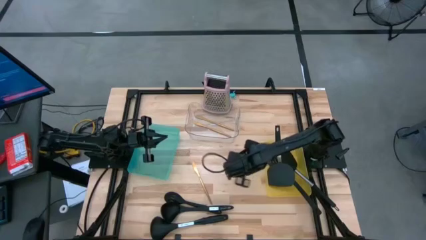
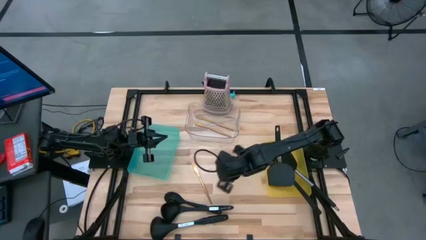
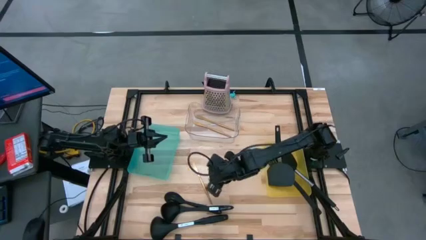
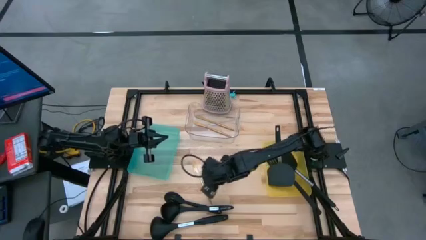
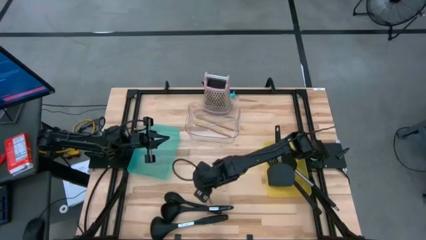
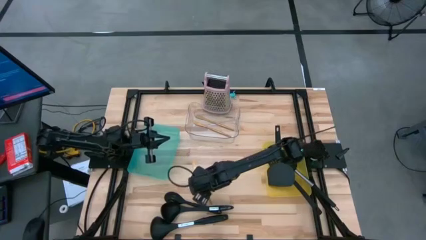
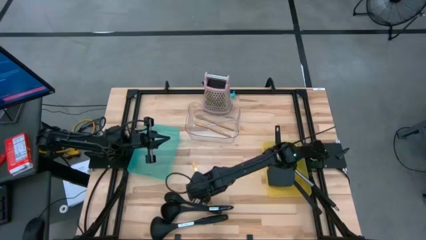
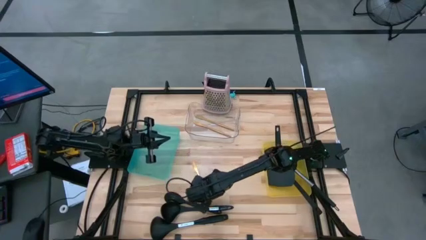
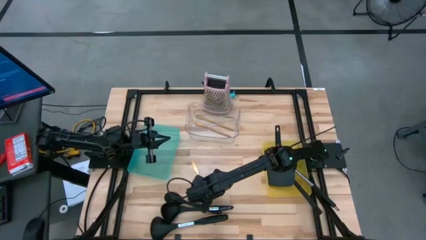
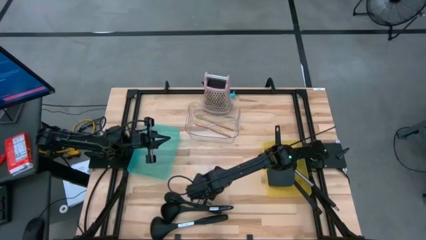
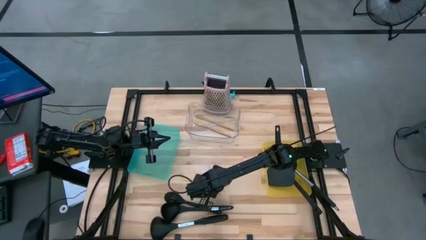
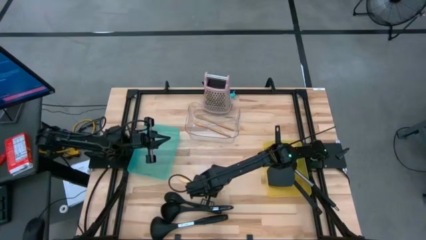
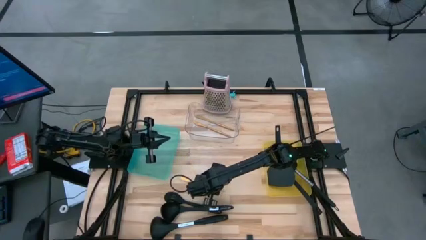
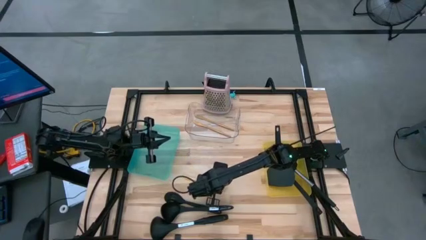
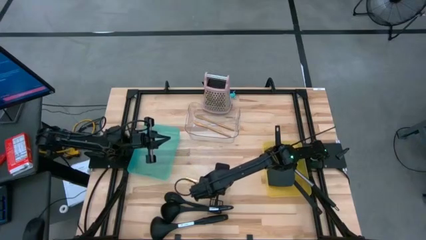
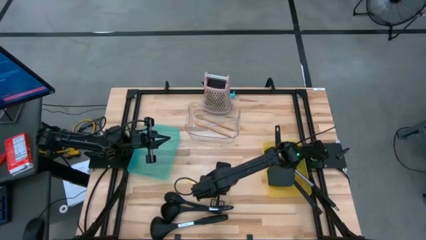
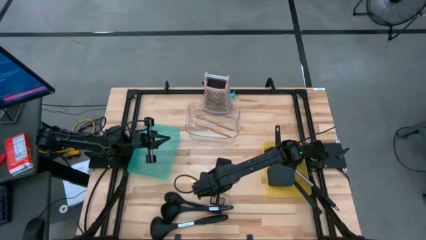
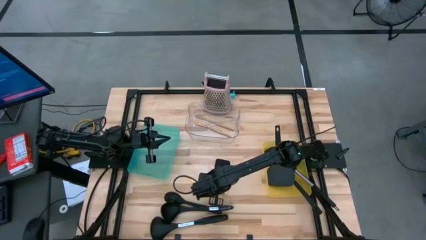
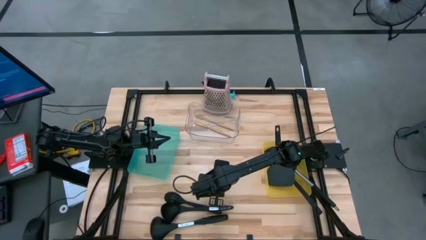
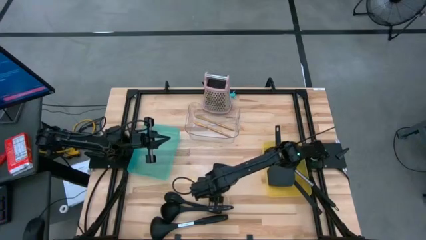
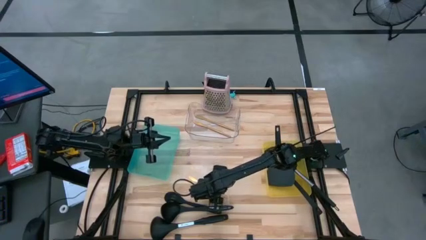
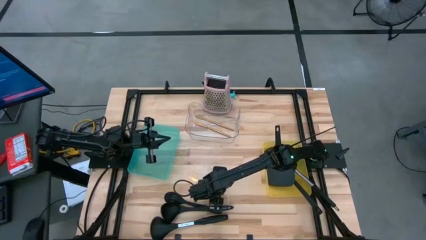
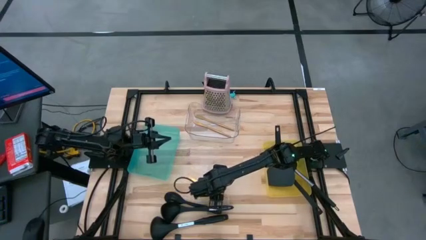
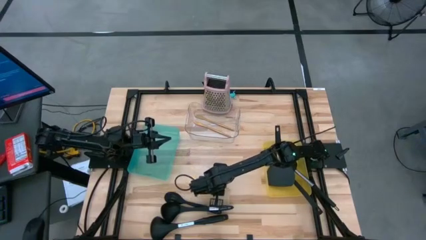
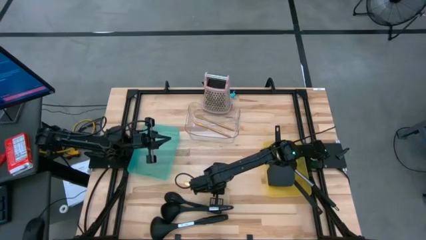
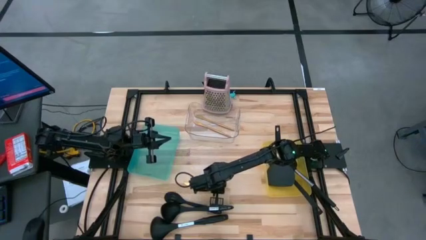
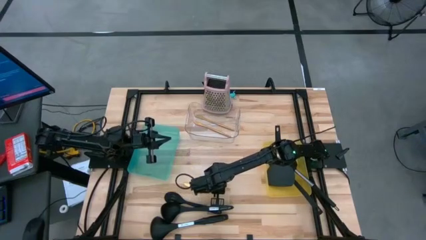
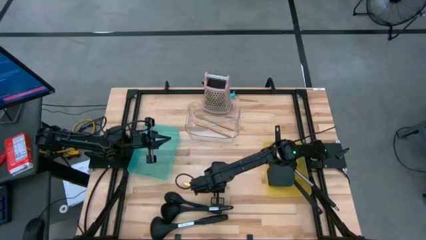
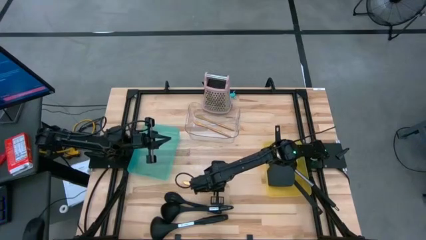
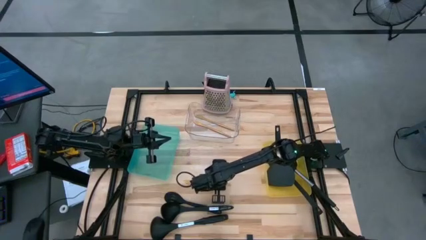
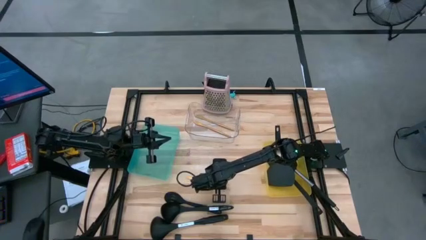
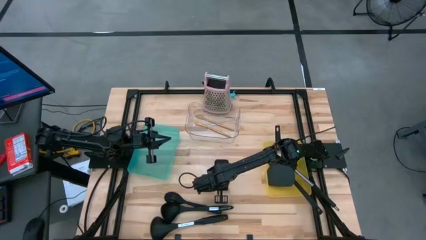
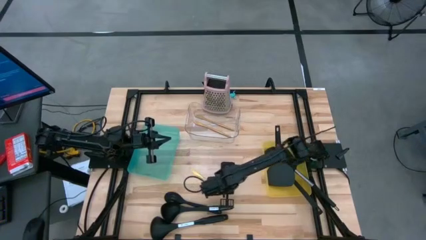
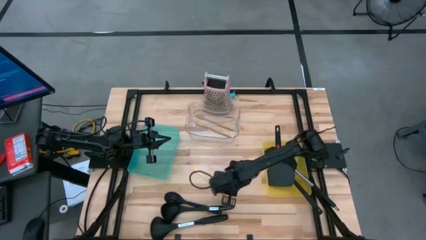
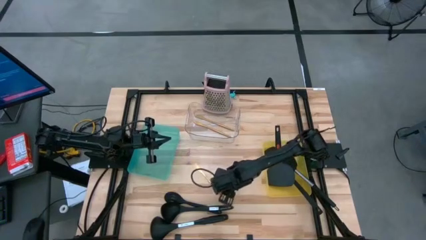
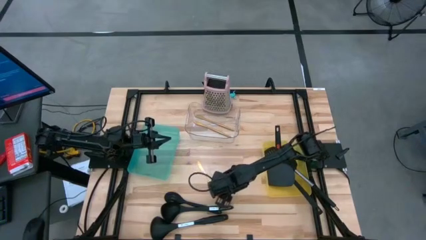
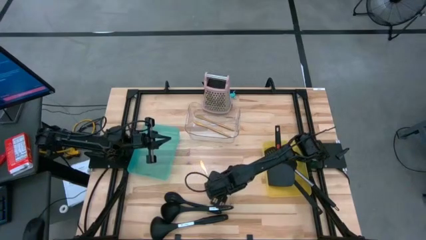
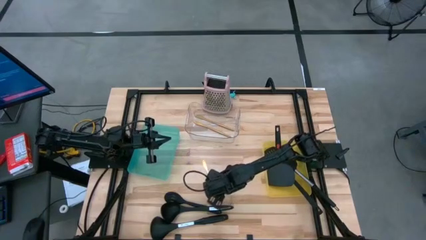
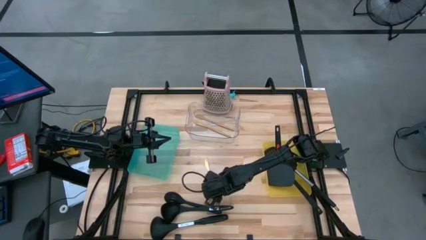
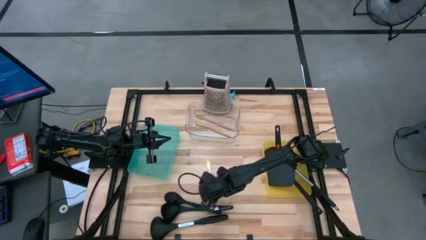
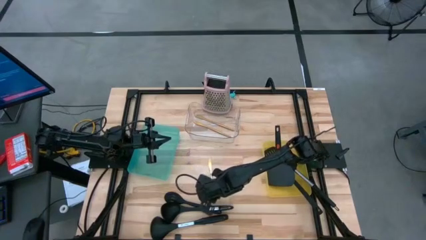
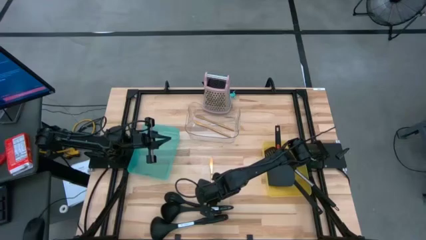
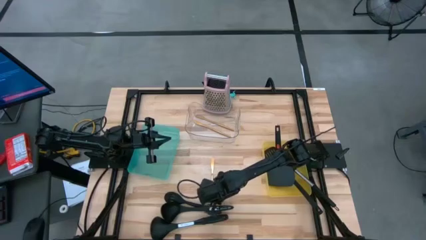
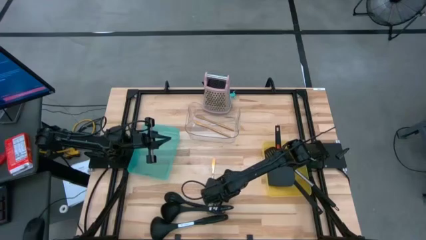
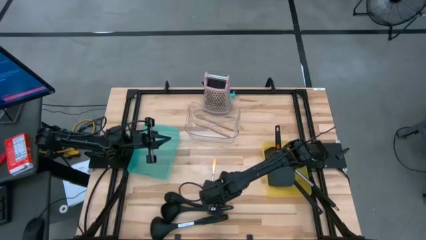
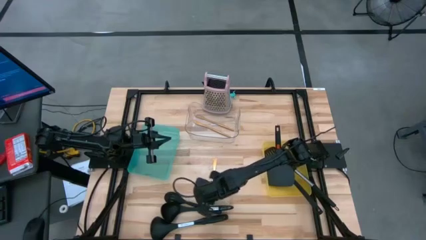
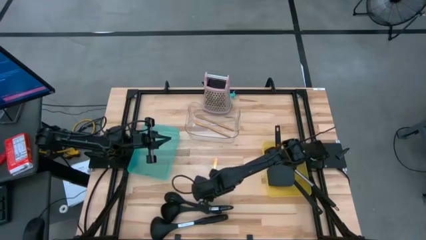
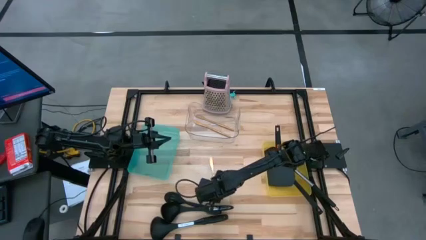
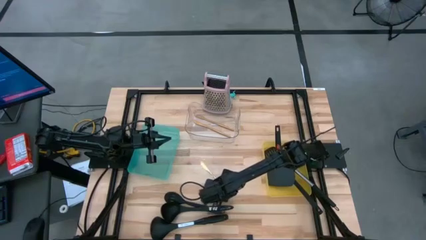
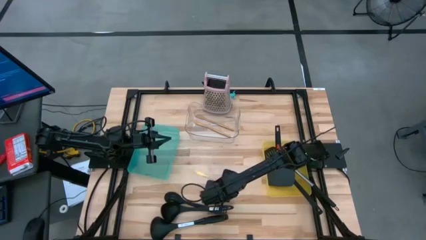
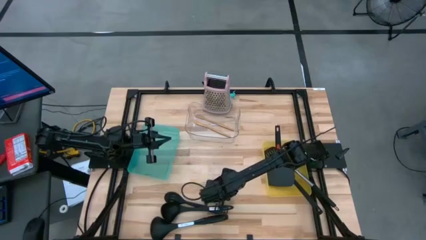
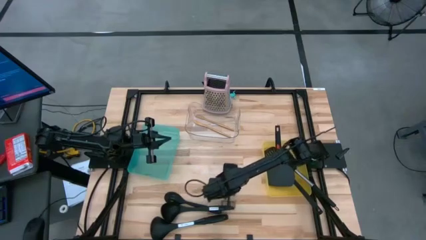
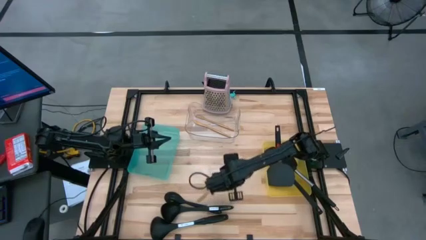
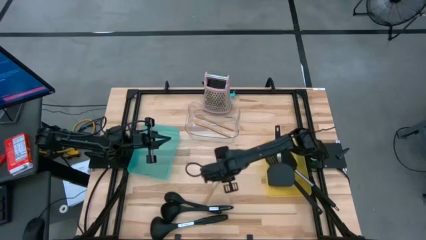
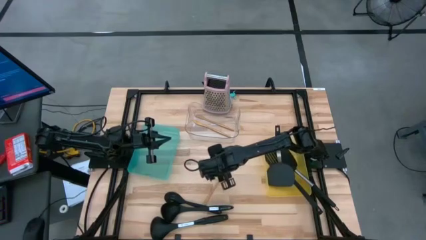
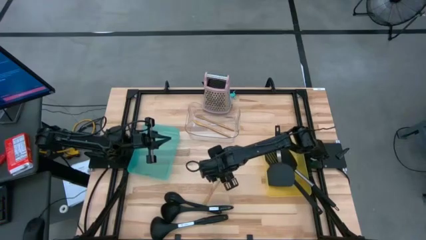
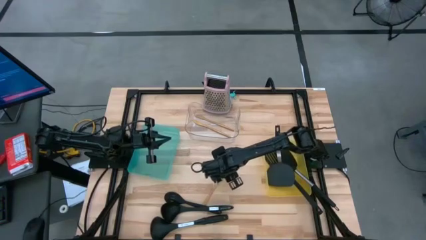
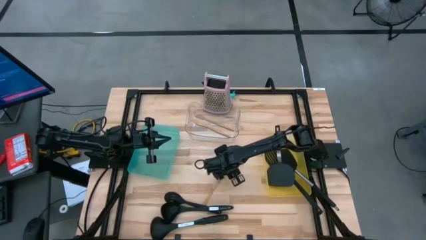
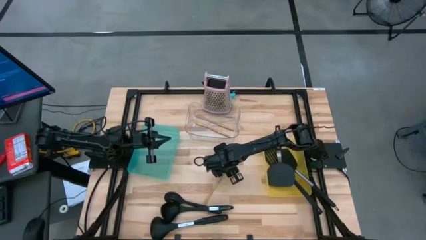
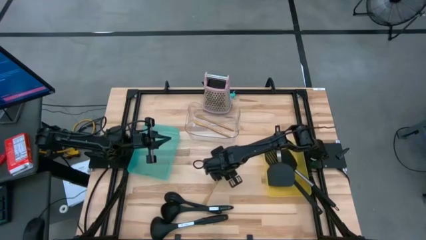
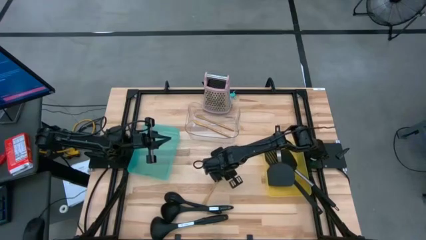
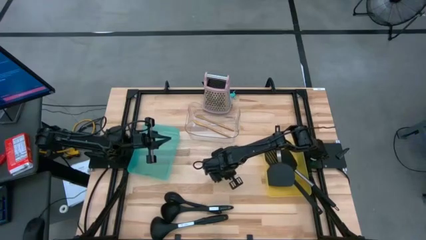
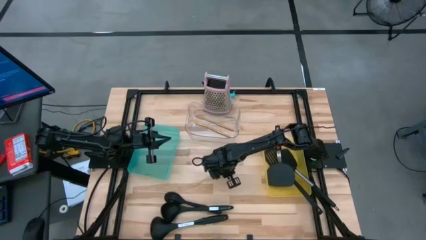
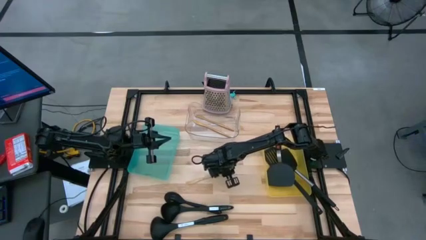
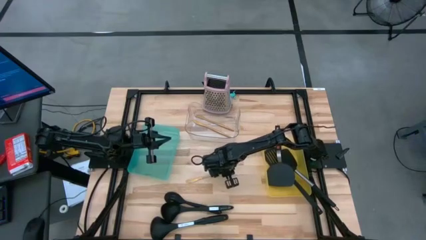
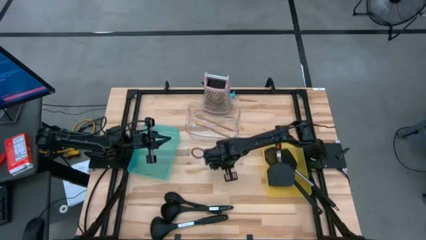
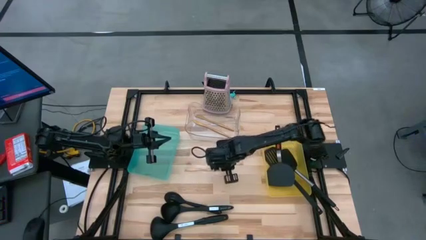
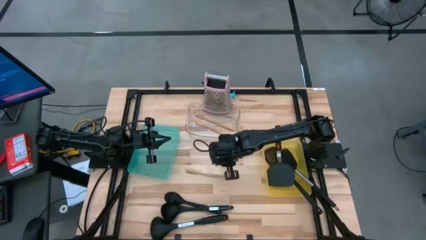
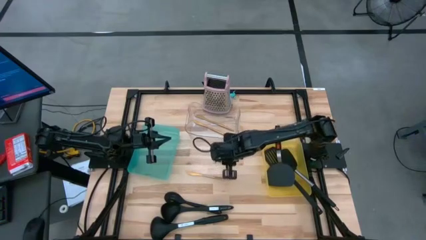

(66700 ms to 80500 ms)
Task: Pick & Place Kitchen Items
Put the gold knife into the transparent bin
